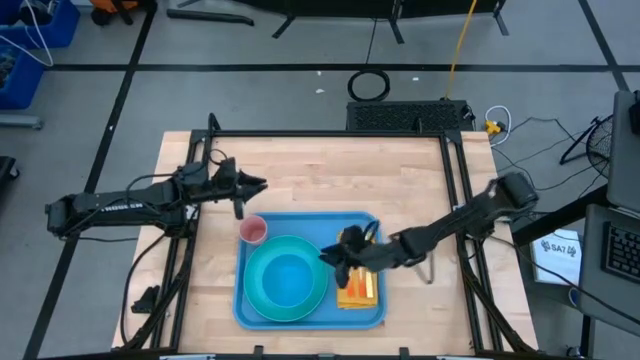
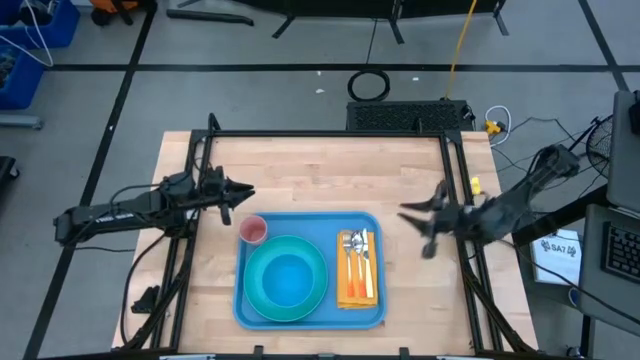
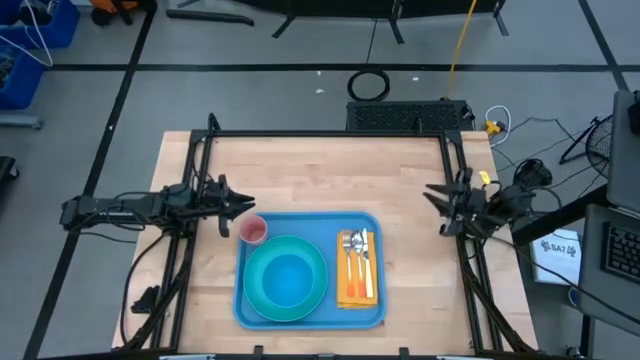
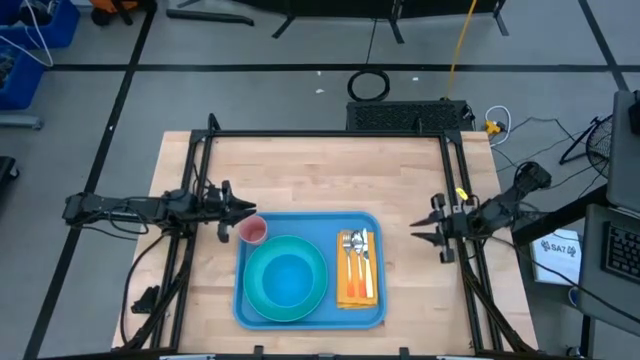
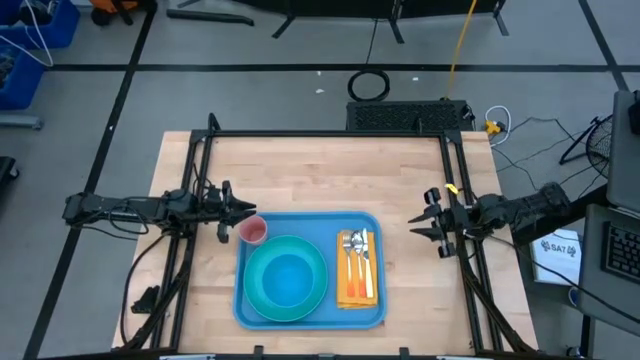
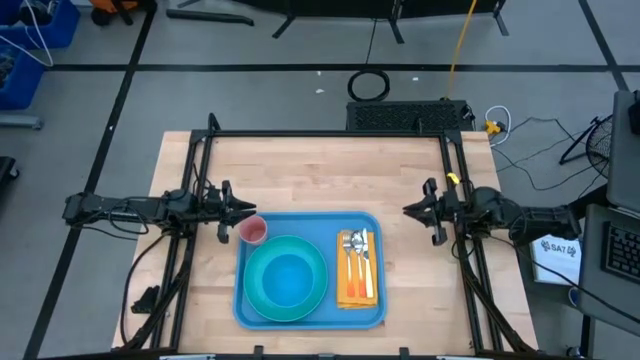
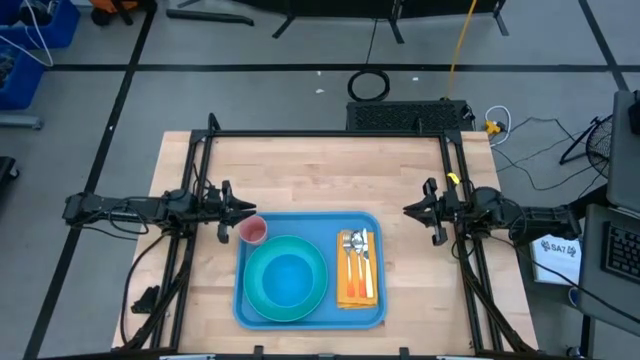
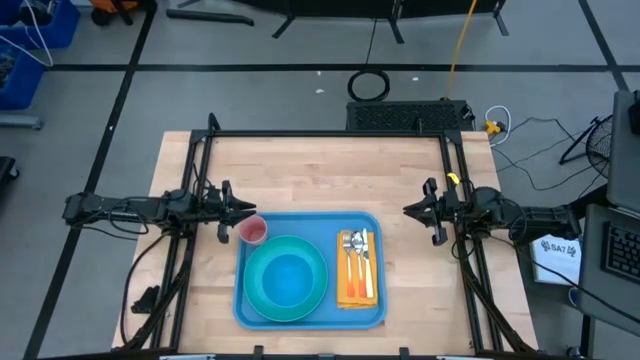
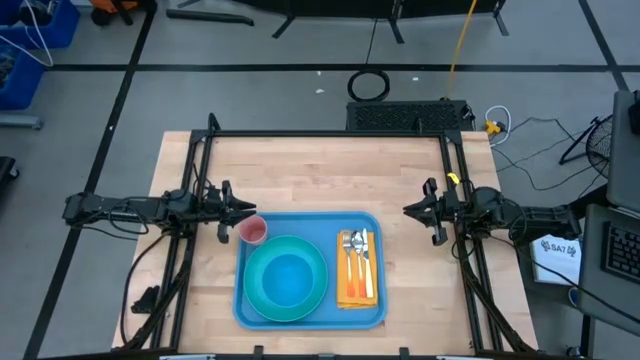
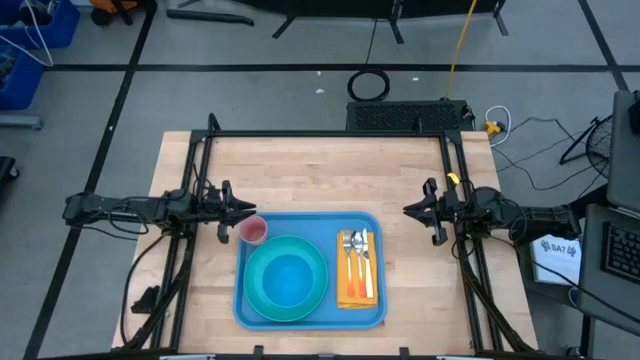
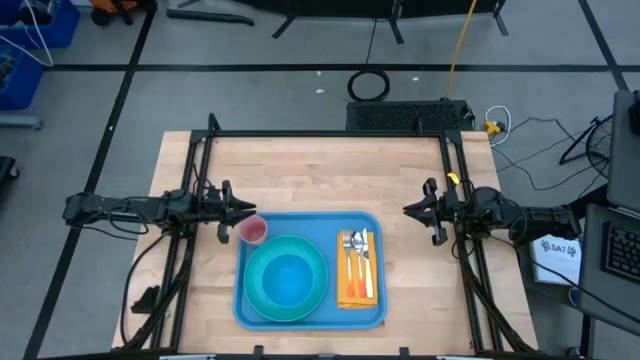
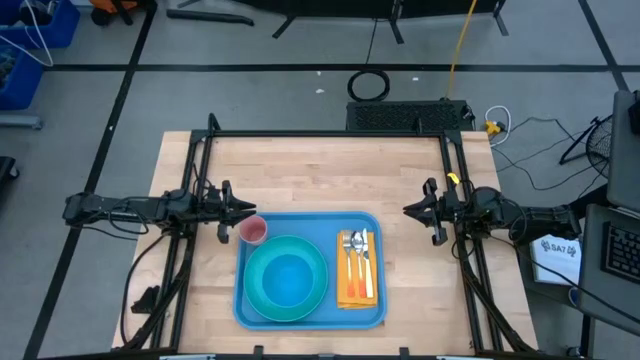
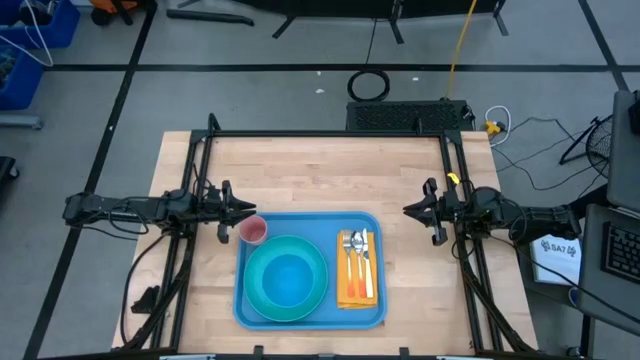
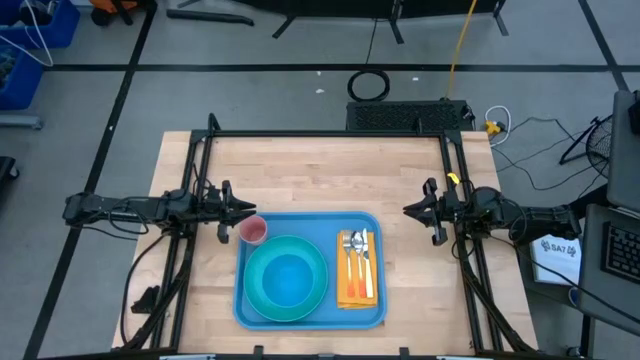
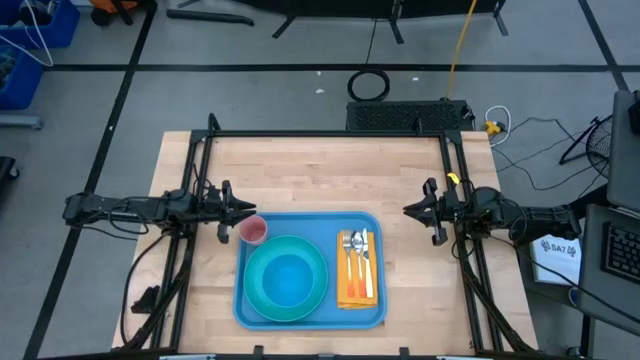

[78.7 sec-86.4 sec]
Task: Set up tray
Return to Home Position

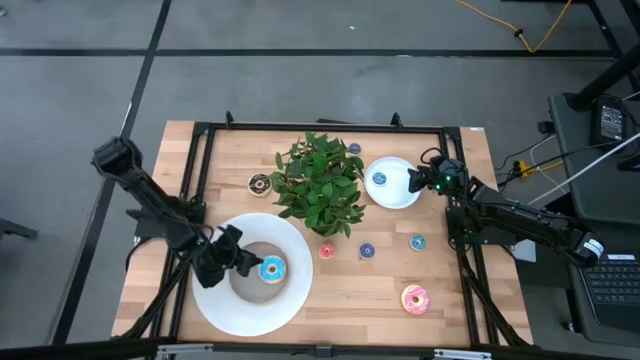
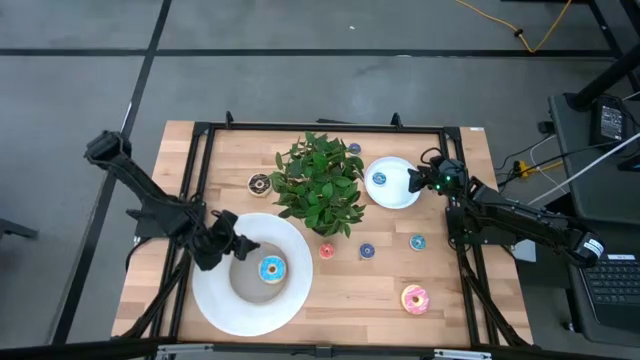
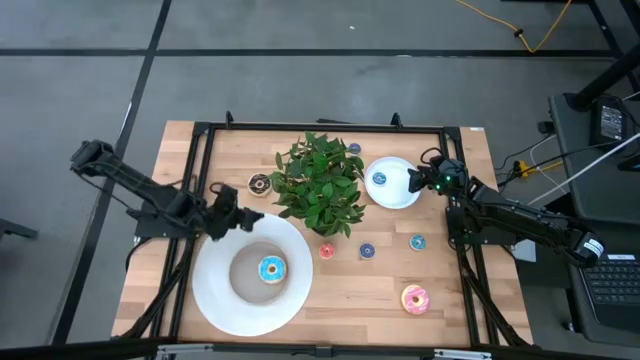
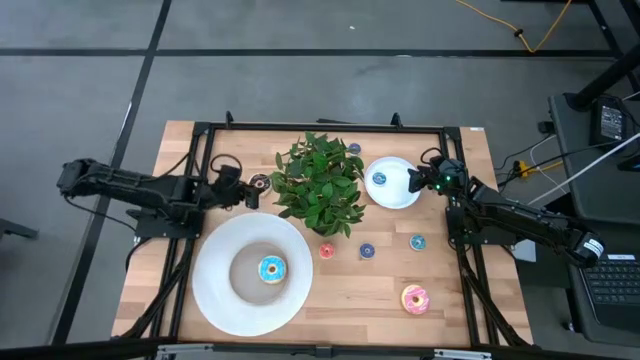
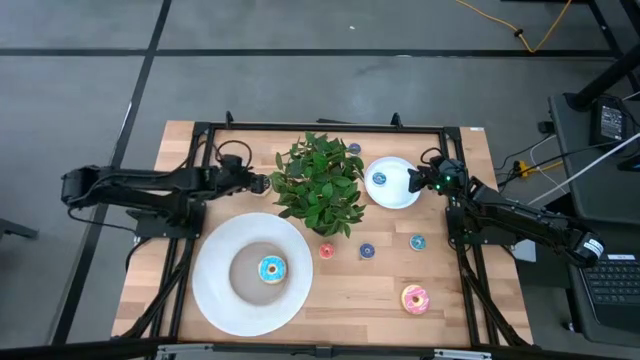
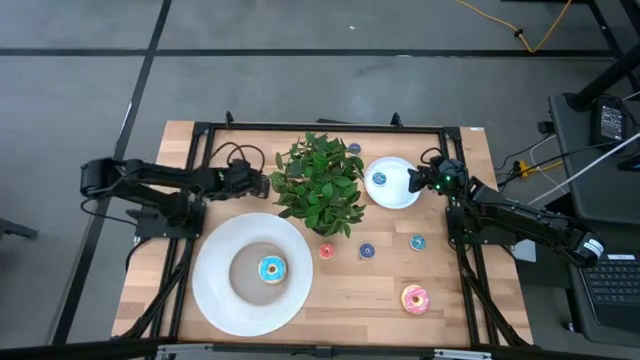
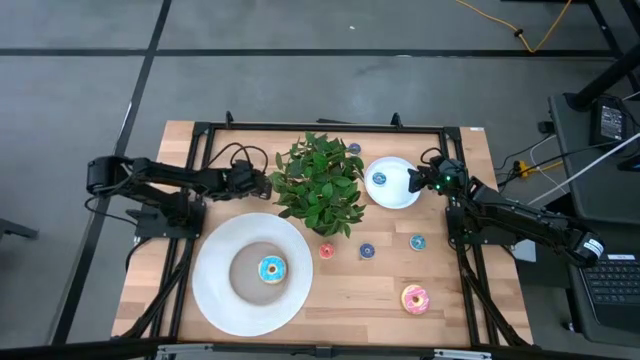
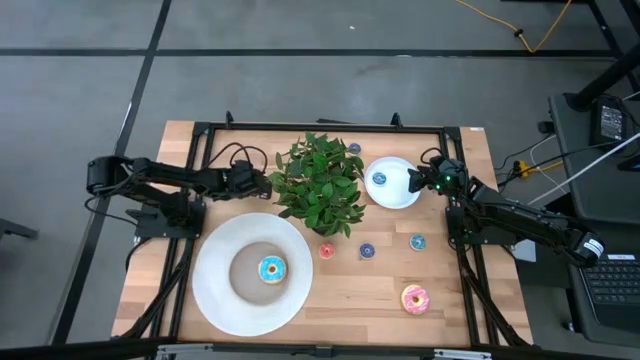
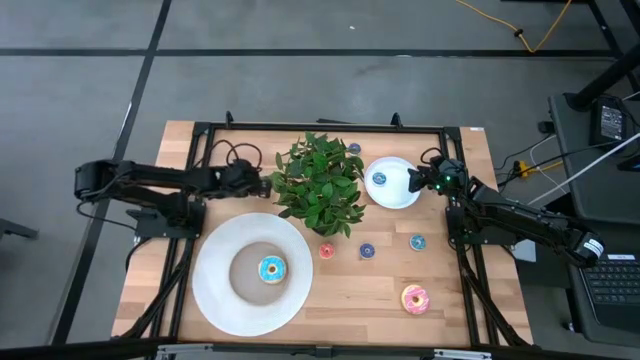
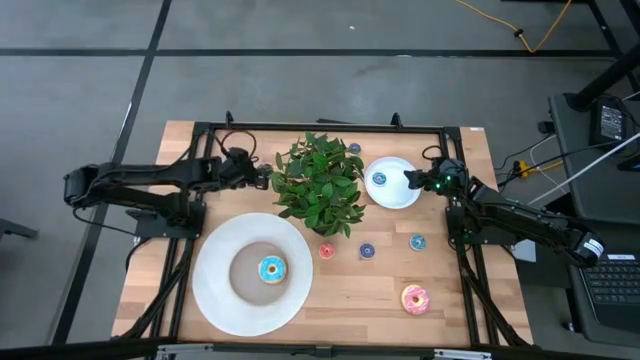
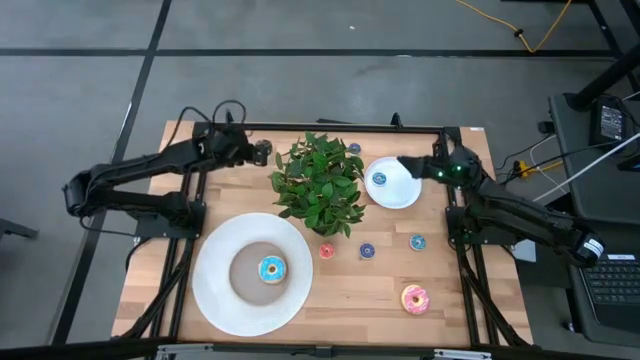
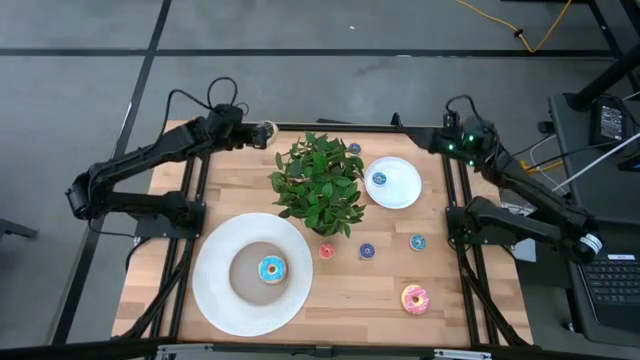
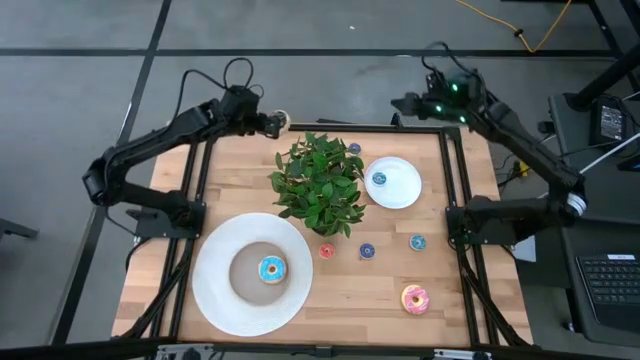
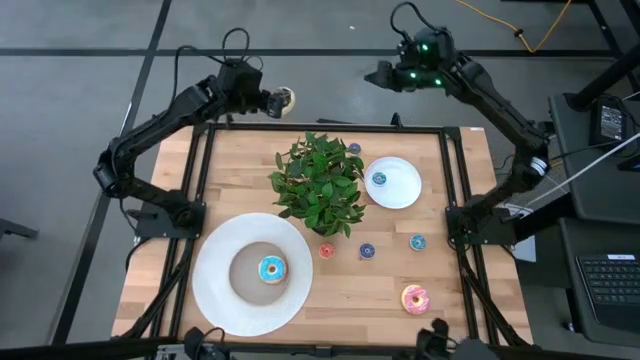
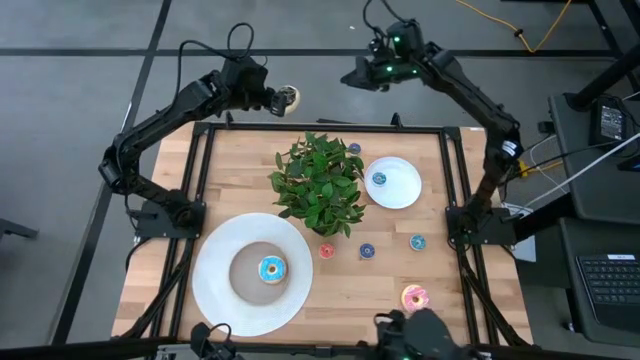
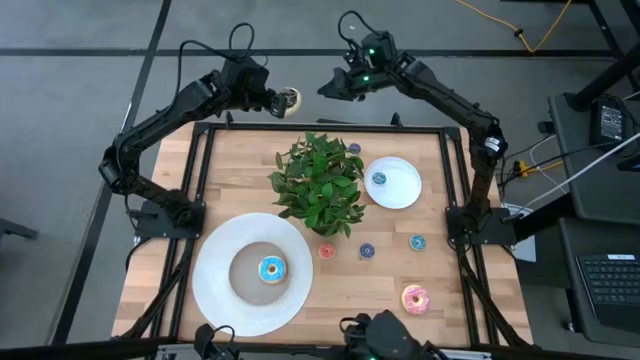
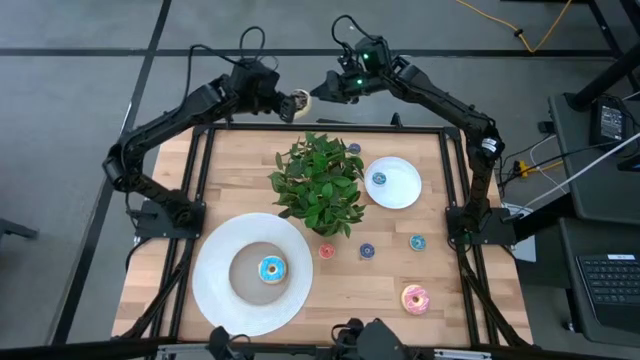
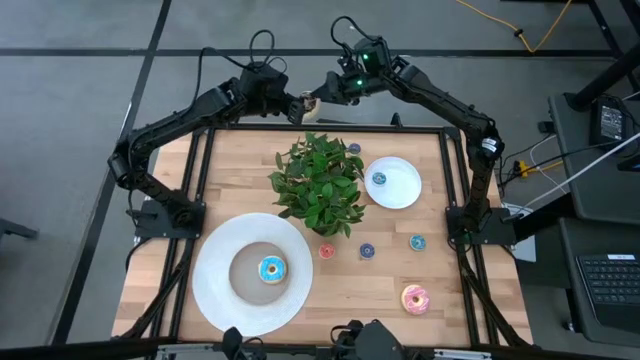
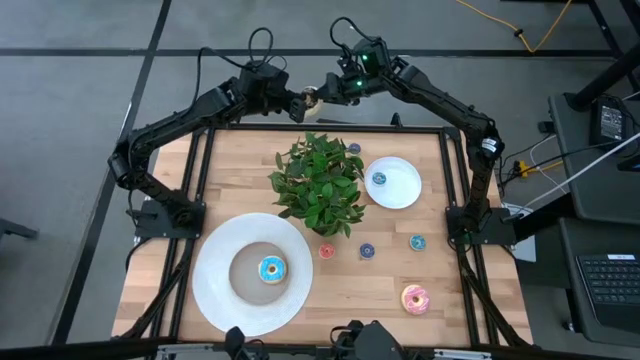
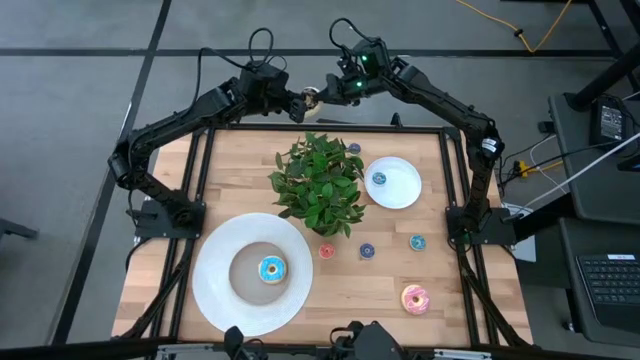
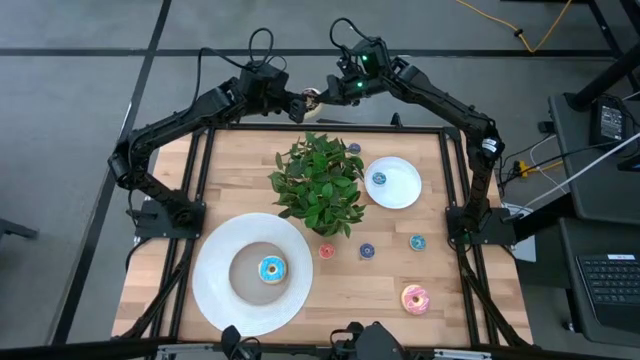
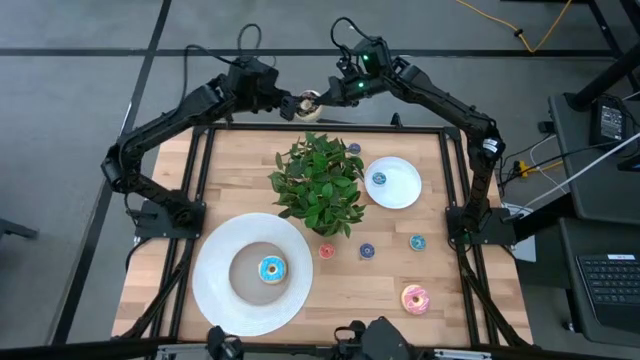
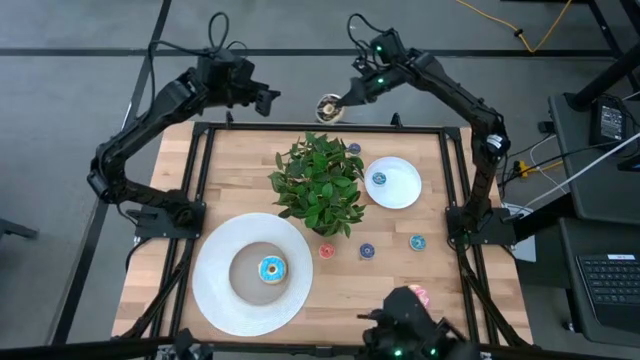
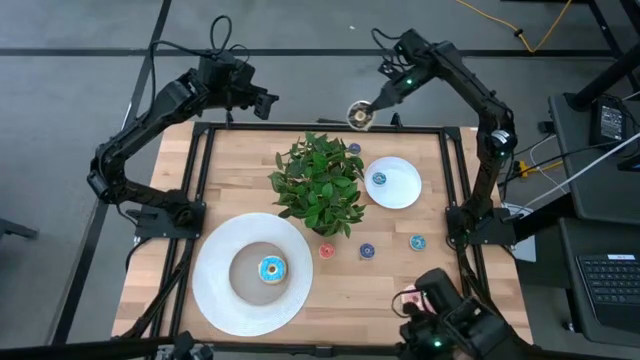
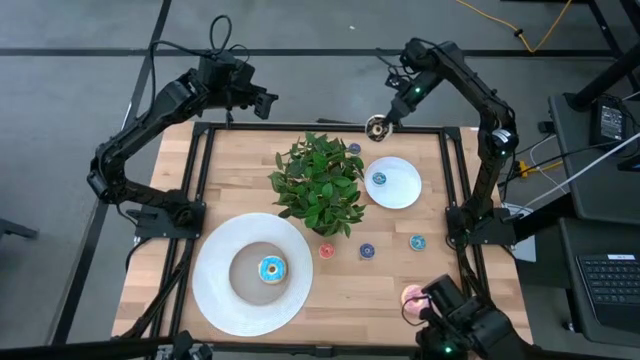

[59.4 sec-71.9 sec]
Task: Pick & Place donuts
Put the large black donut on the brown plate
